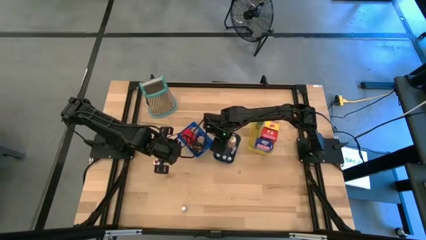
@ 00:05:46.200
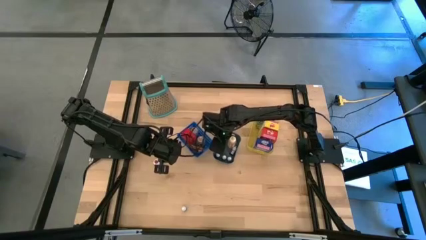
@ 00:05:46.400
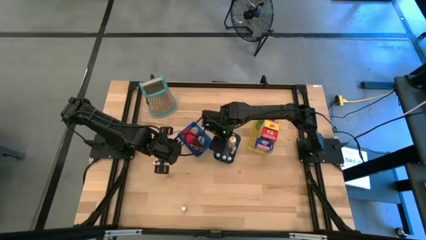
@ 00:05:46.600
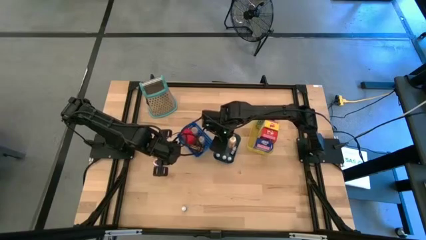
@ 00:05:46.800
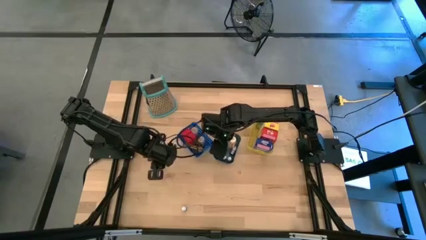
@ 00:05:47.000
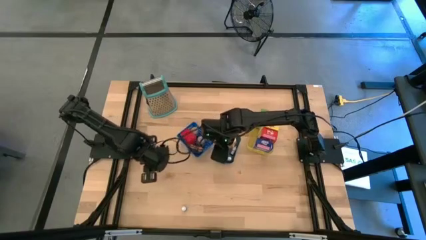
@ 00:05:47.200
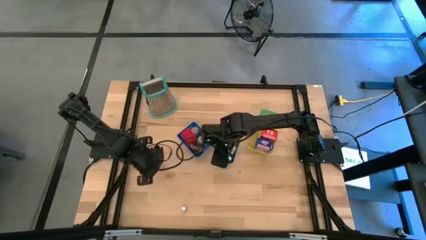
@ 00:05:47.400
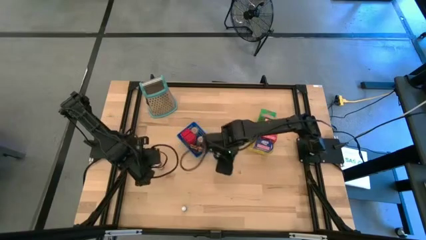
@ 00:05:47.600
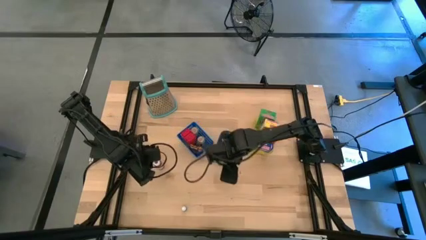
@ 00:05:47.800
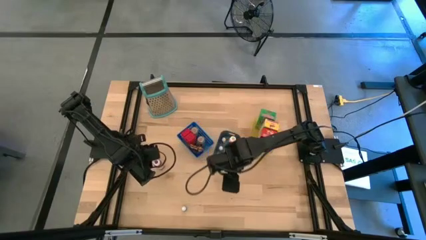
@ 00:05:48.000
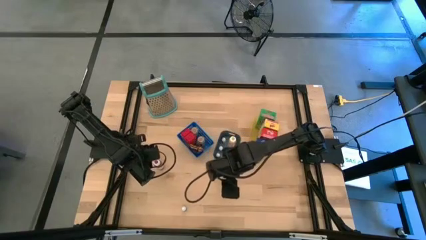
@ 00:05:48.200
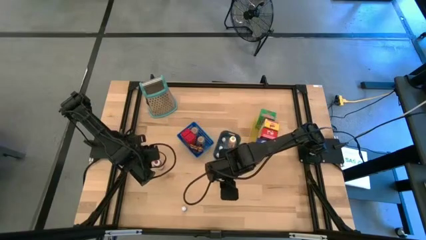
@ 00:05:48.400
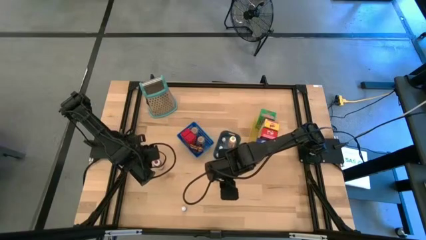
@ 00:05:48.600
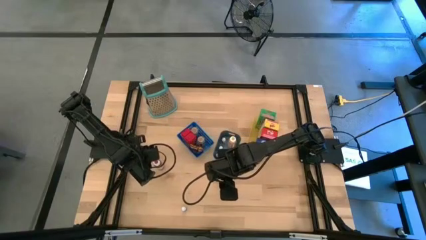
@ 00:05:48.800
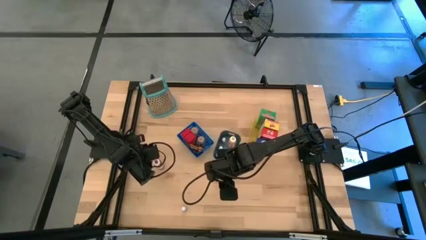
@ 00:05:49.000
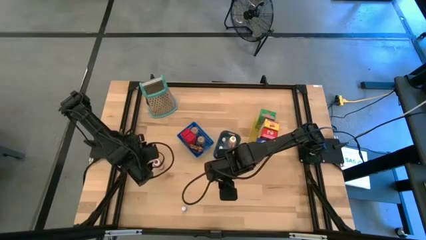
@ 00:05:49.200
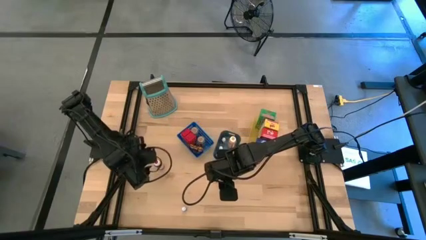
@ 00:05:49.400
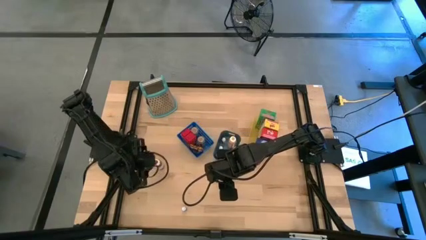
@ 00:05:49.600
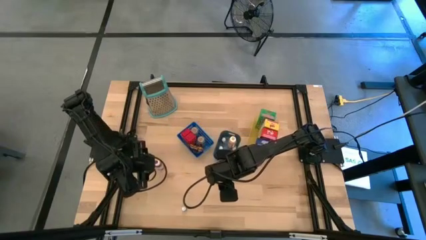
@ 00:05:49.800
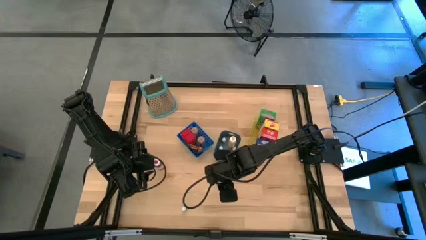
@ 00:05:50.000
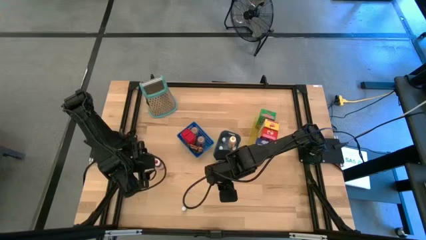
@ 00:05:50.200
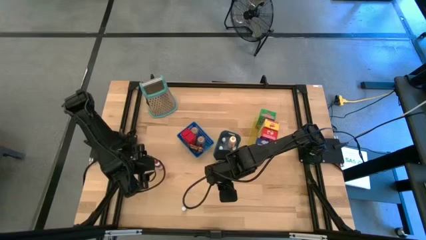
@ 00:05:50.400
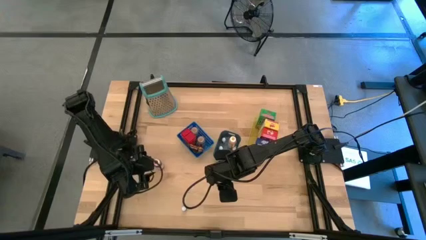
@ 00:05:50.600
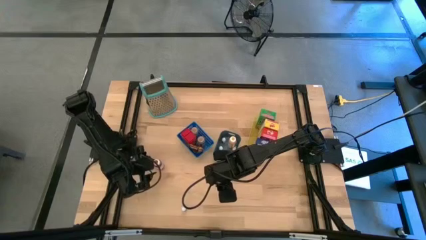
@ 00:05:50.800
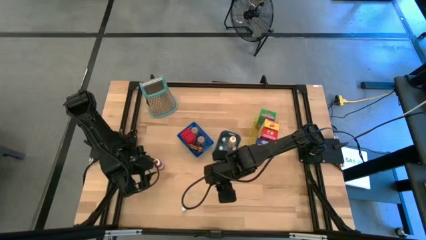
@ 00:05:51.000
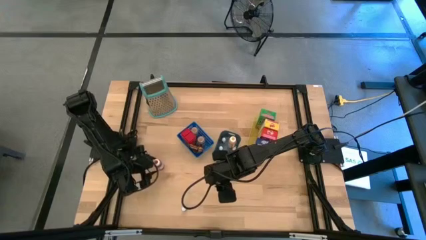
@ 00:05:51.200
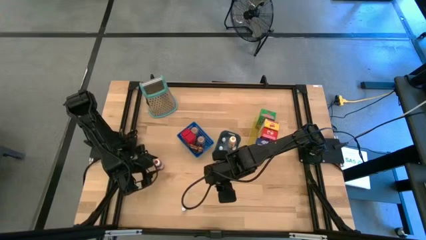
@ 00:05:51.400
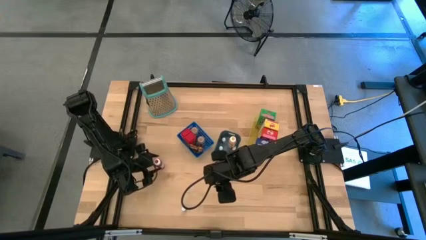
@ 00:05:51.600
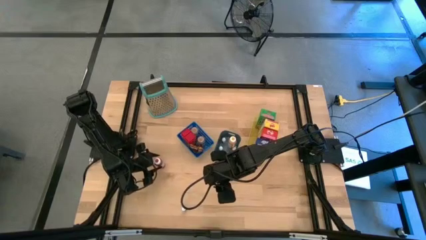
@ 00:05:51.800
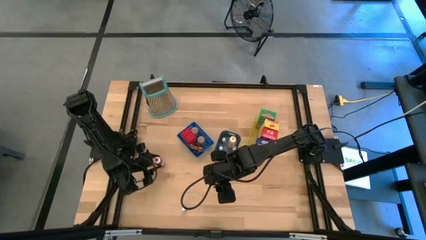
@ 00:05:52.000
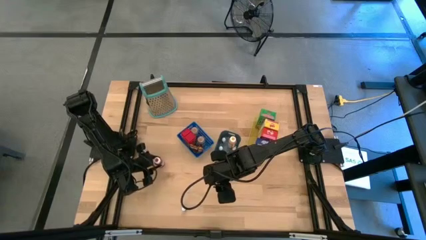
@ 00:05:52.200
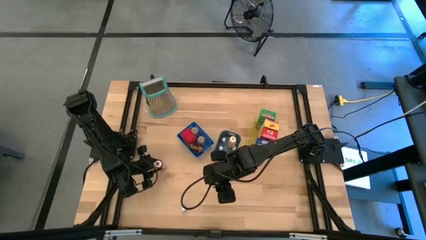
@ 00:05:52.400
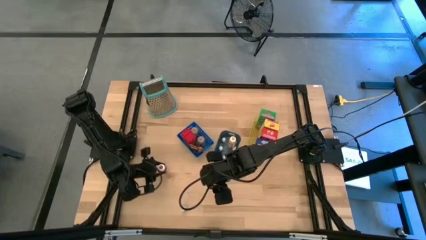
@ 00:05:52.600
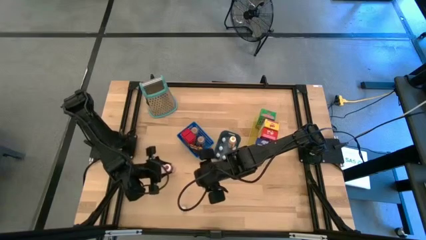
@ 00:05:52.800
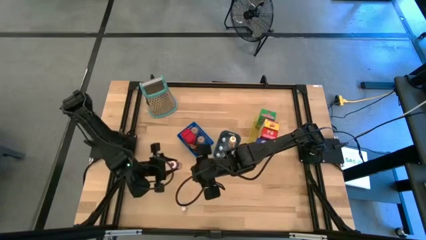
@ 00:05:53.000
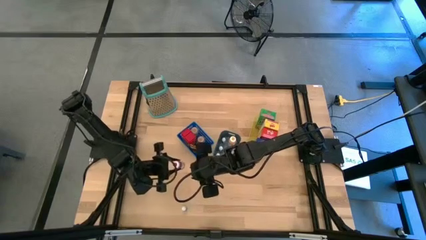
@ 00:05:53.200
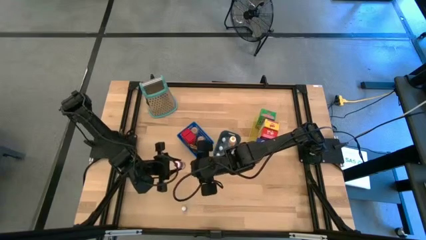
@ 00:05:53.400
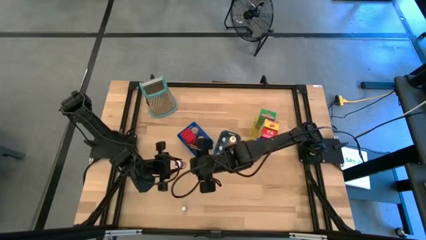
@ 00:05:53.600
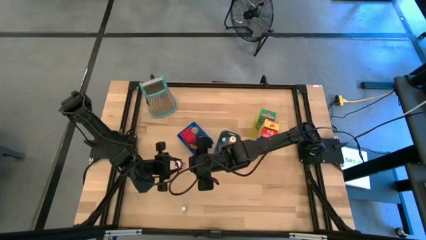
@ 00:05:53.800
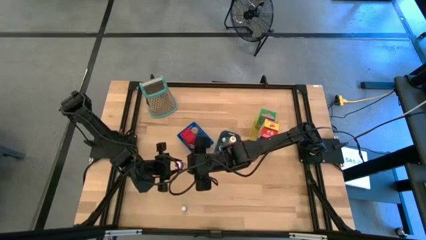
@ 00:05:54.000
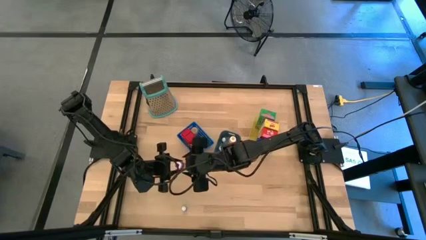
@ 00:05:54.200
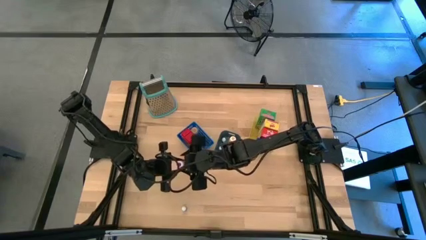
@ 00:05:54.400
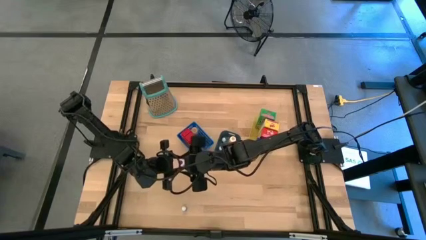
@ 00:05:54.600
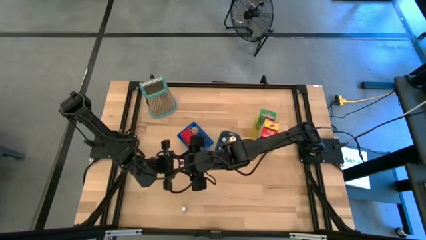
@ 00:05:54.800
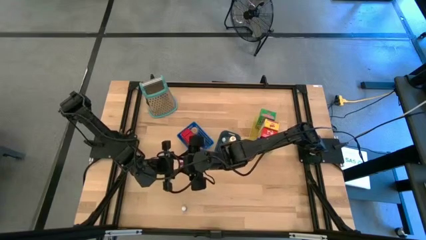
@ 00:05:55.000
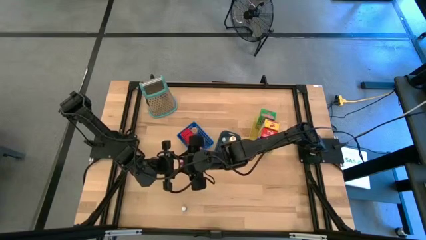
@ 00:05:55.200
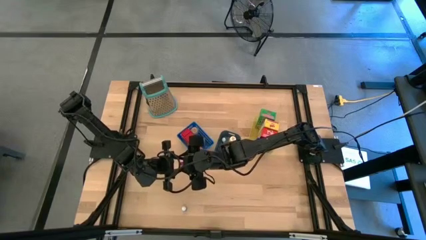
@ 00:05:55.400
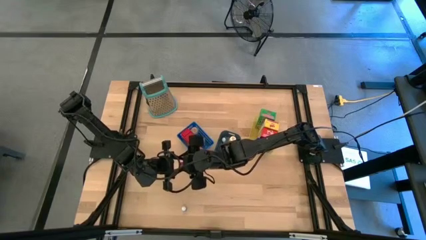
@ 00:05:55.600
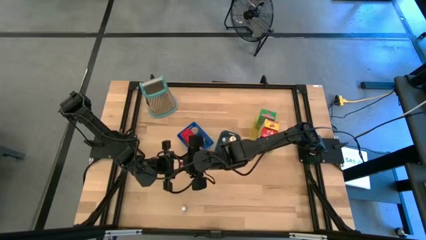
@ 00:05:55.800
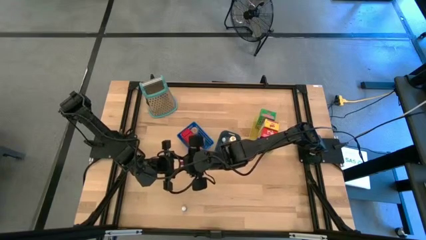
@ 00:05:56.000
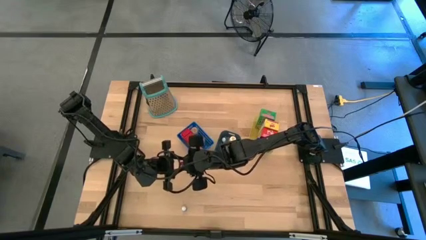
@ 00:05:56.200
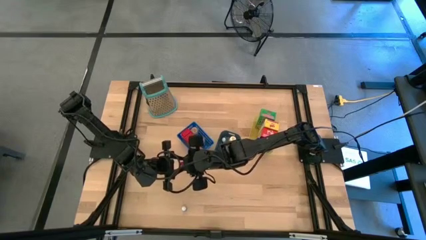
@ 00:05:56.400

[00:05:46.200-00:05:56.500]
Task: Pick & Place Kitchen Items
Put the red food coloring bottle into the green bin
